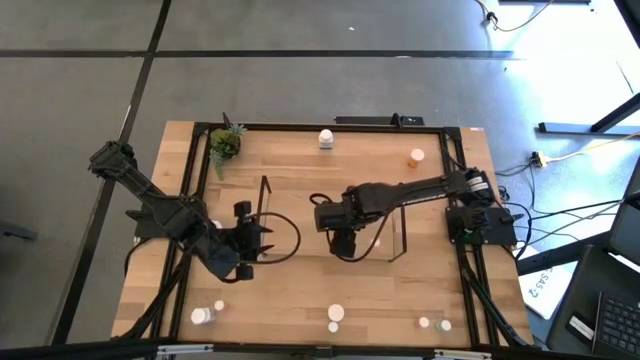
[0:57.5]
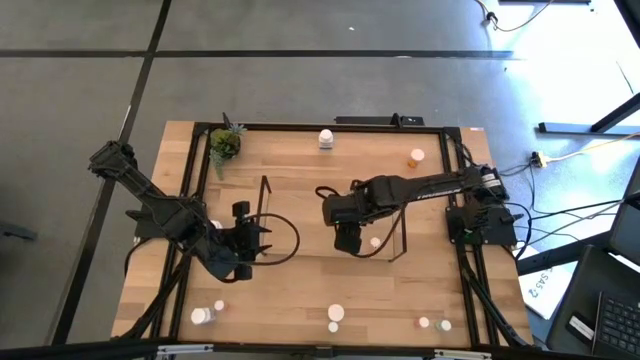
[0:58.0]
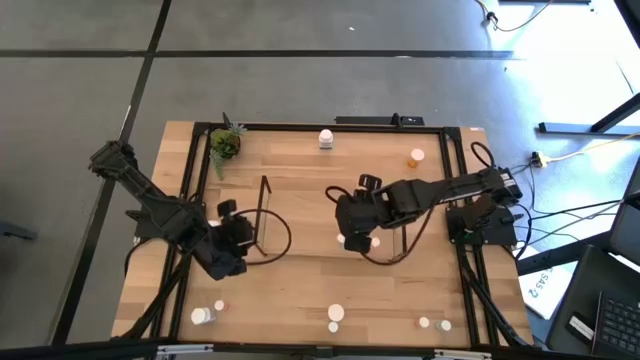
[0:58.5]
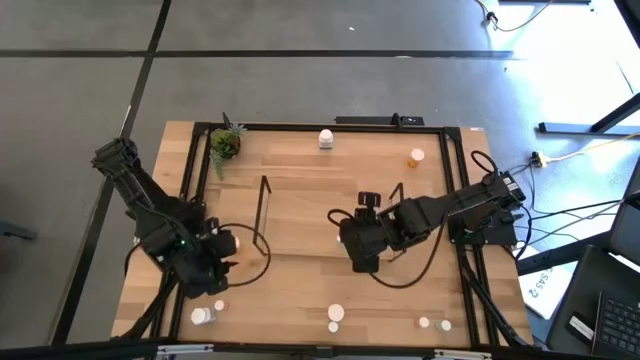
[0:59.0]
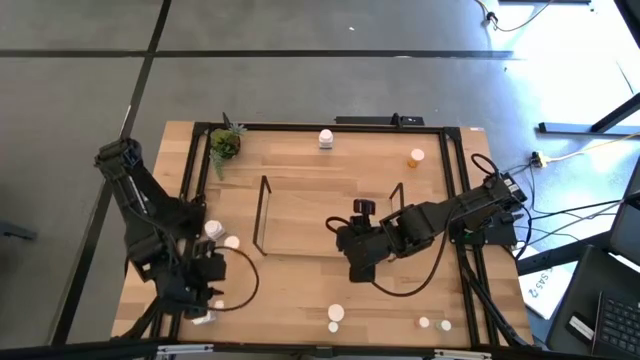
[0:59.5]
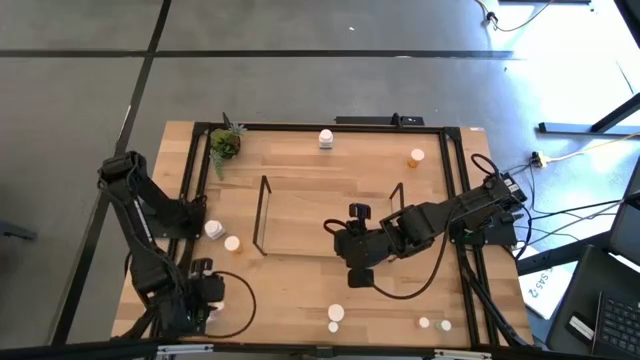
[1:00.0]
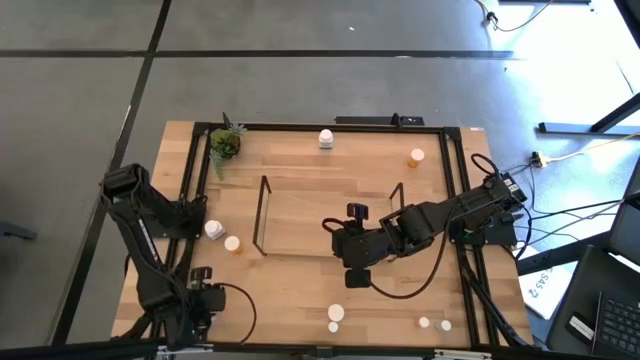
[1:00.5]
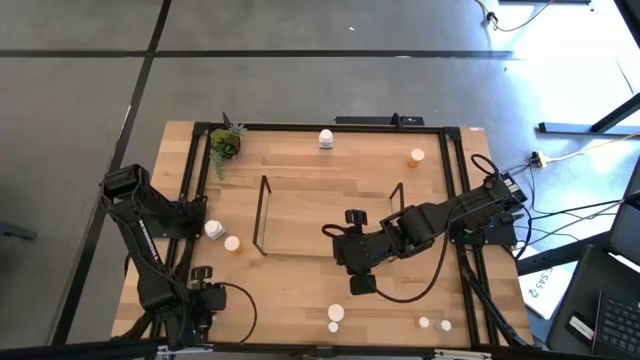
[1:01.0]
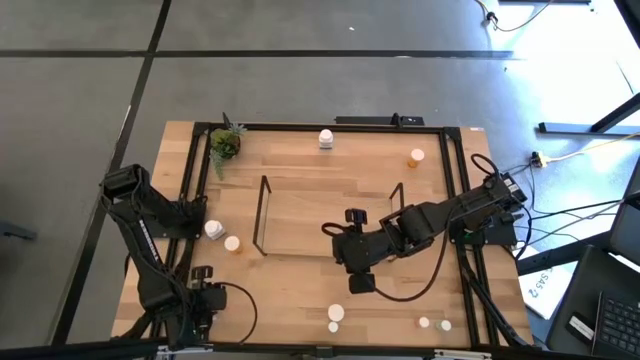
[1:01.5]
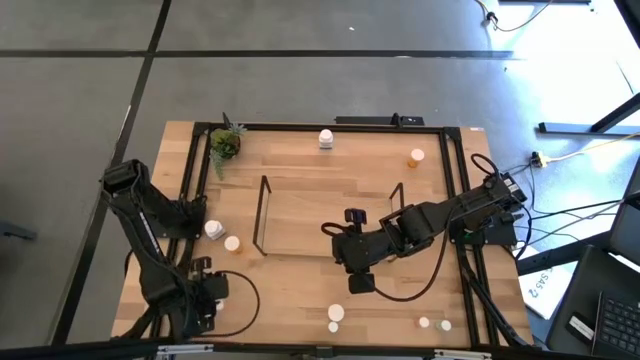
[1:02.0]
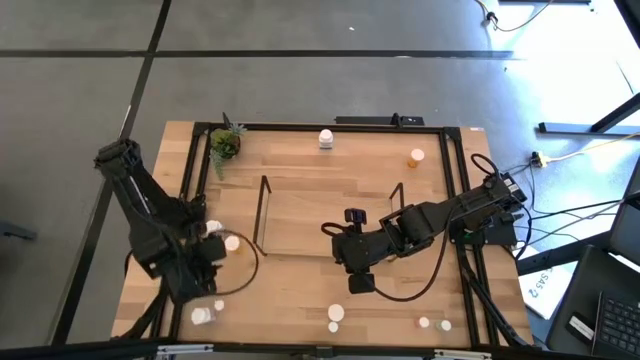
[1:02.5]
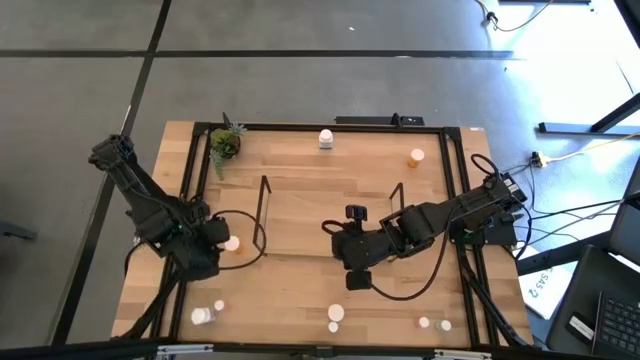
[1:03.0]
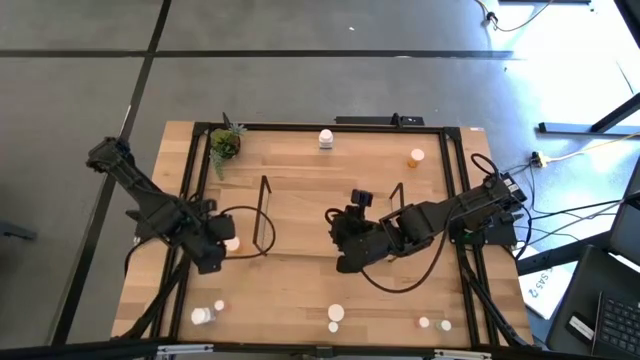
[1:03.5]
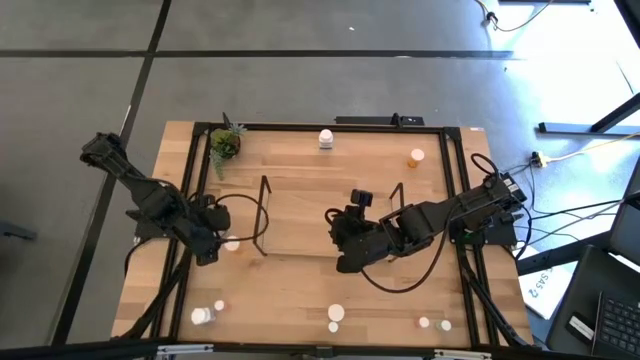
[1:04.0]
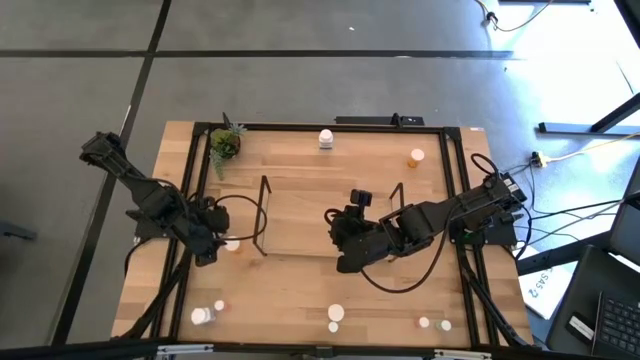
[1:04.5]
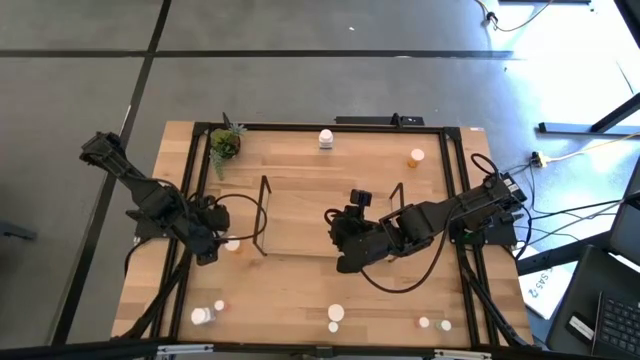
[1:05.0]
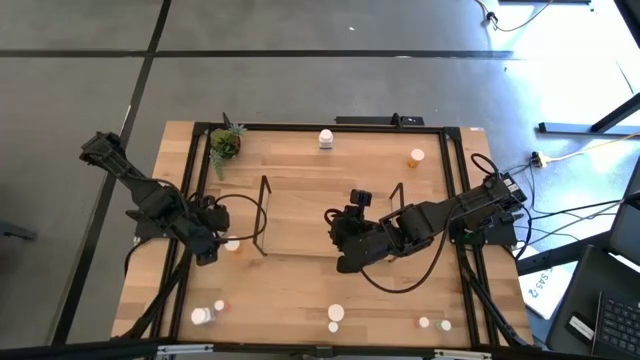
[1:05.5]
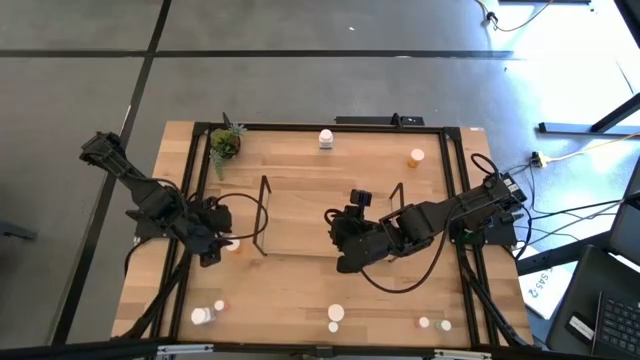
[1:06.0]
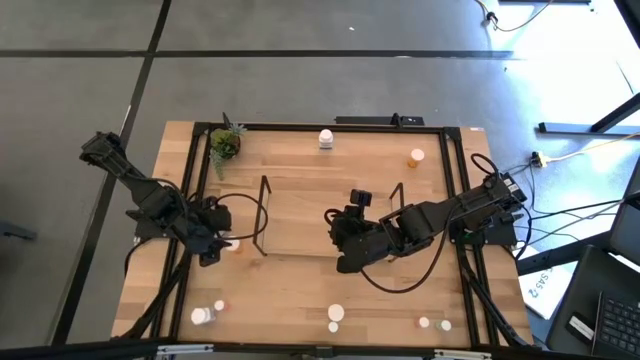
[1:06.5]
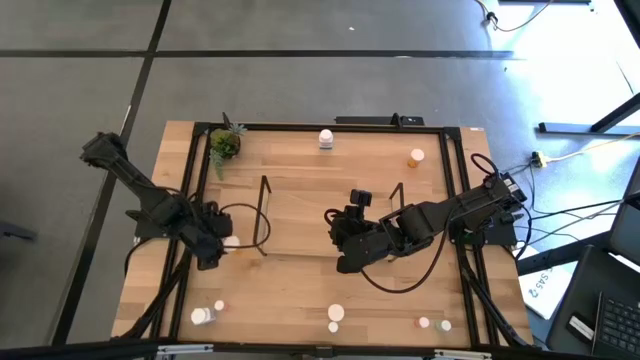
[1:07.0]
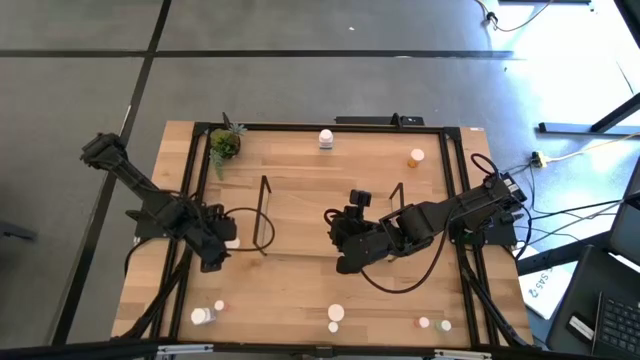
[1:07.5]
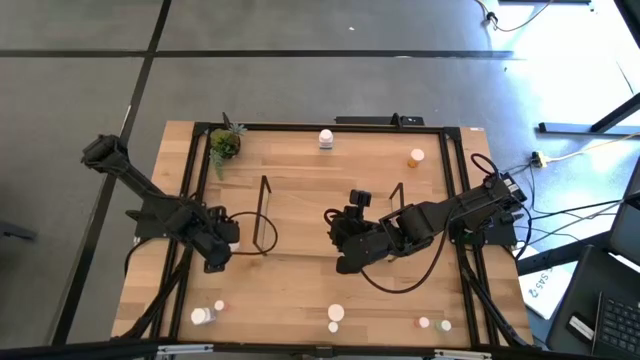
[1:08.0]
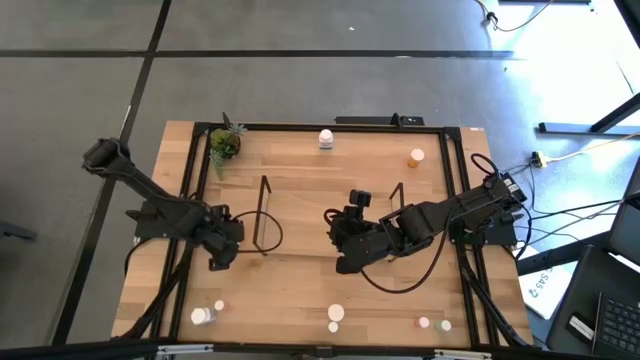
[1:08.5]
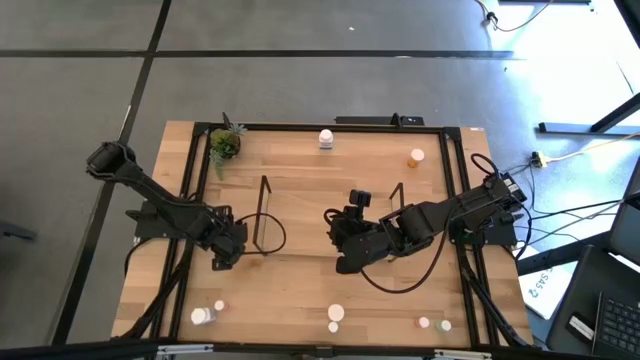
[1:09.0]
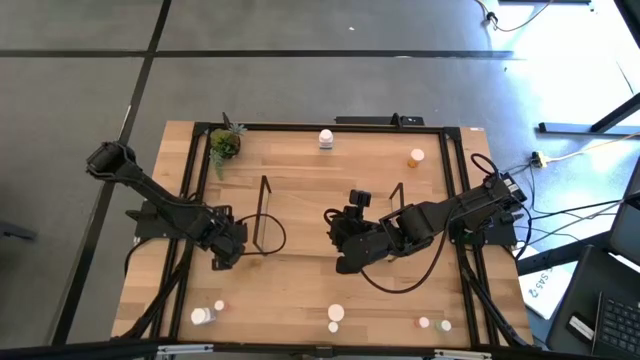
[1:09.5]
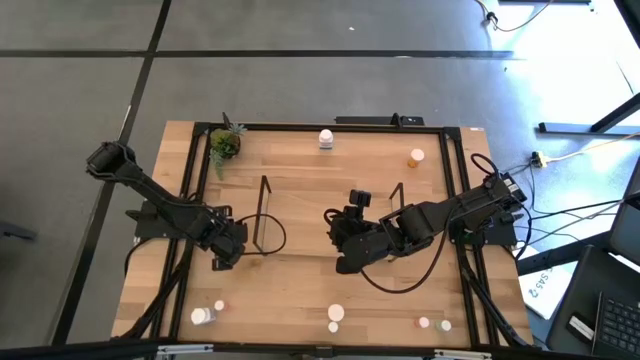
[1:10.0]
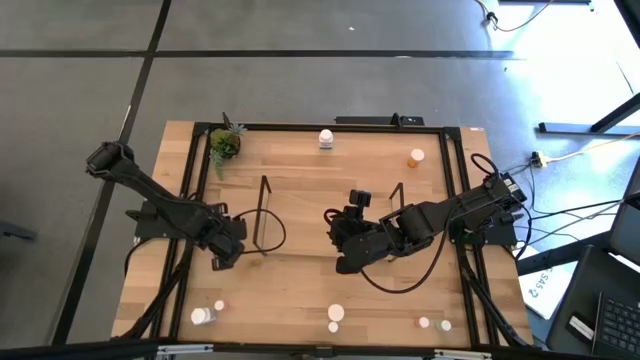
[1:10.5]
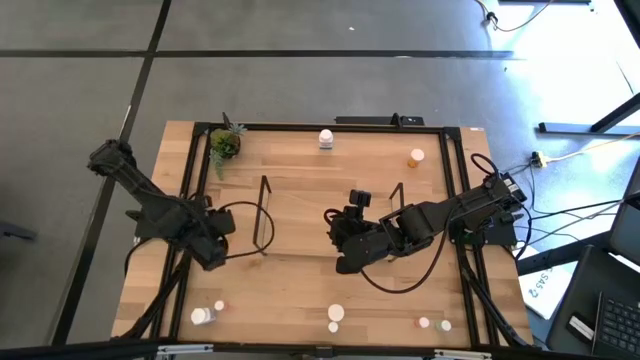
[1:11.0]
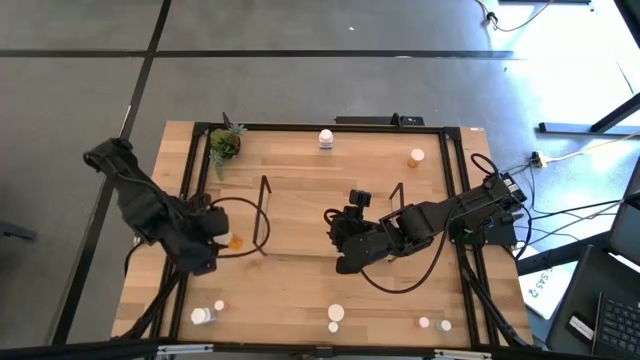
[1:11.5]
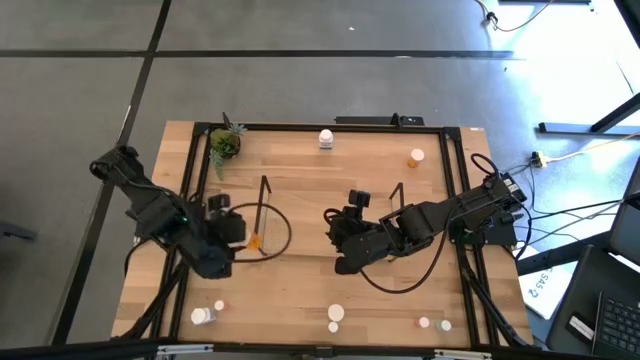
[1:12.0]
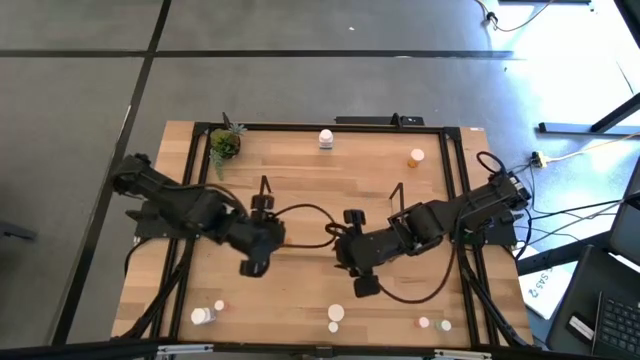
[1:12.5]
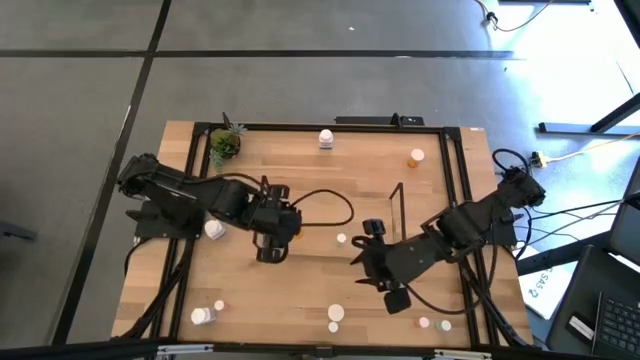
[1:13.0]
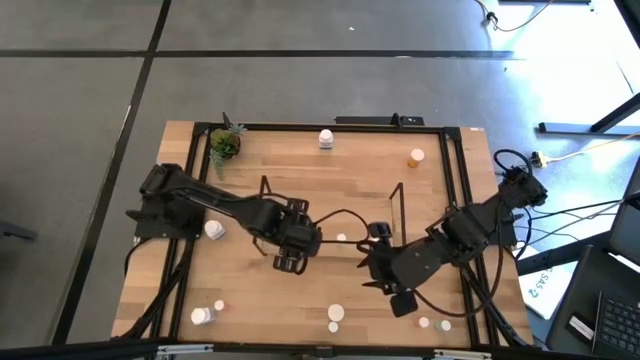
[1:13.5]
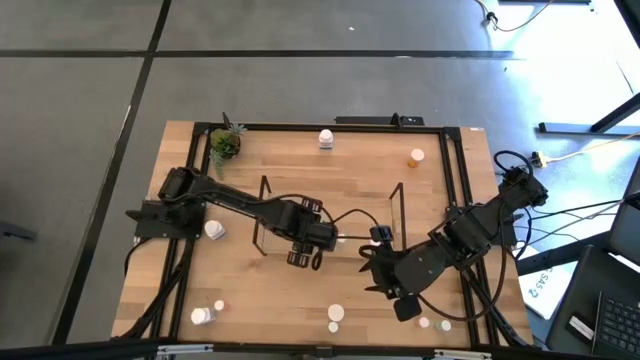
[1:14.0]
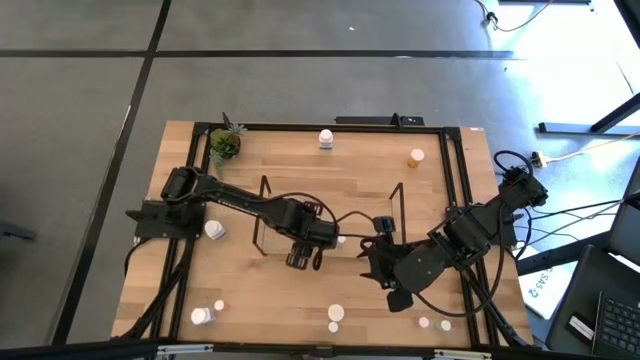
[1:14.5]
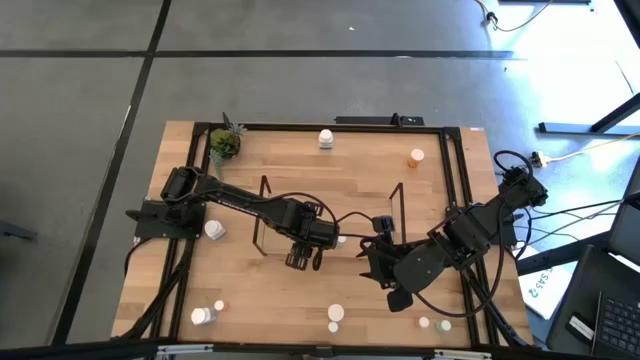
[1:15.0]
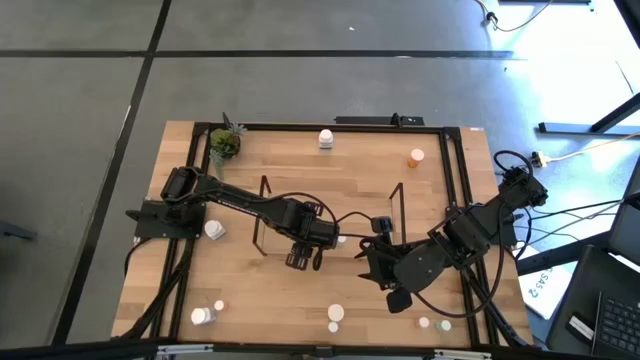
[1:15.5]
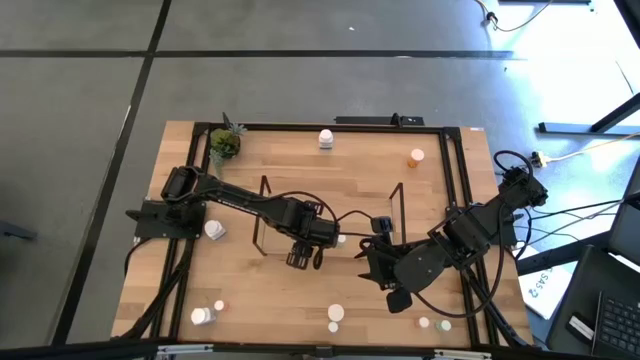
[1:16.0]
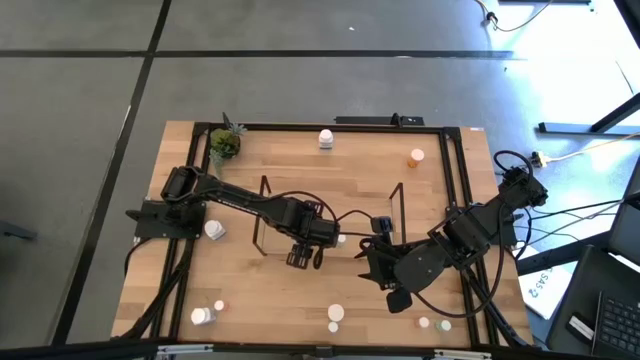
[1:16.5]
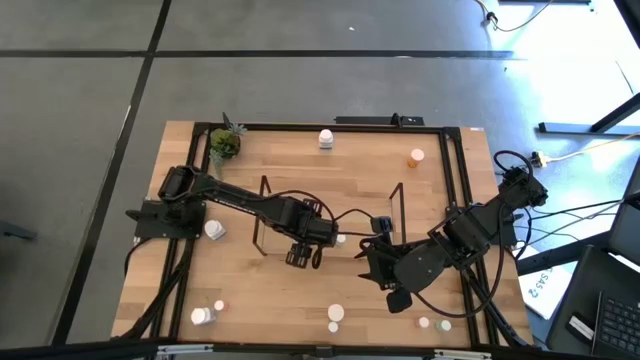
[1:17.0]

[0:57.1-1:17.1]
Task: Pick and place medicine bottles onto shelf by color
Put the middle orange pill bottle on the shelf

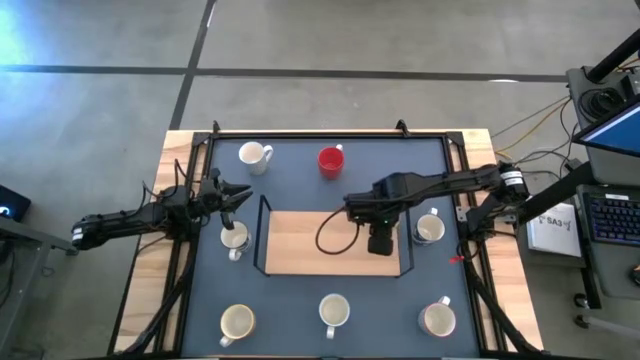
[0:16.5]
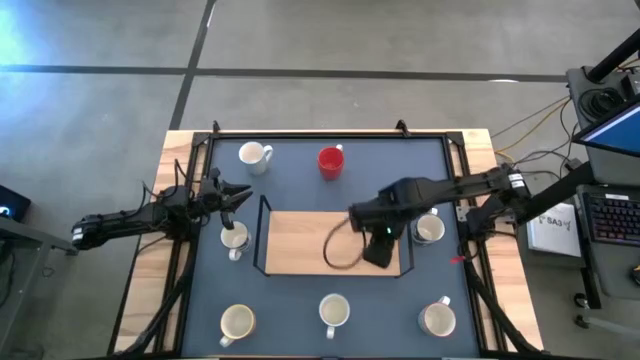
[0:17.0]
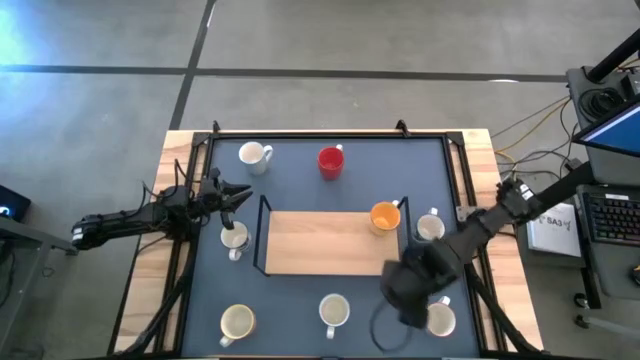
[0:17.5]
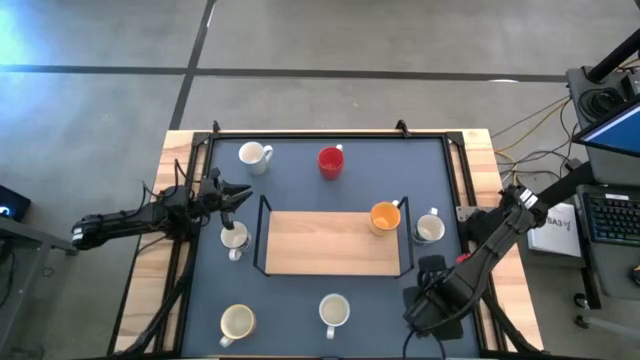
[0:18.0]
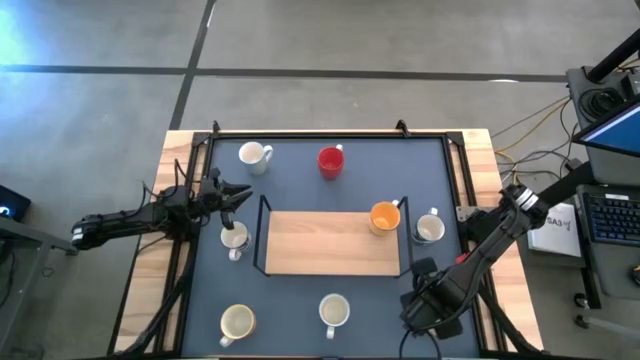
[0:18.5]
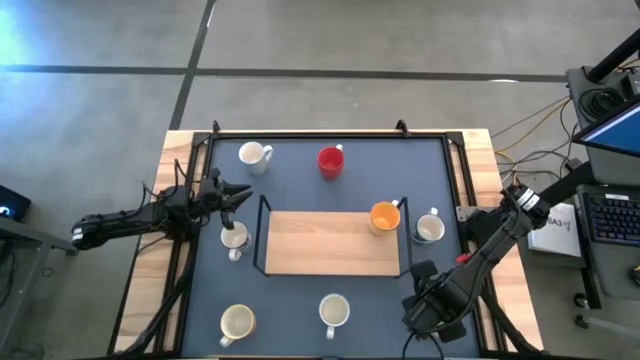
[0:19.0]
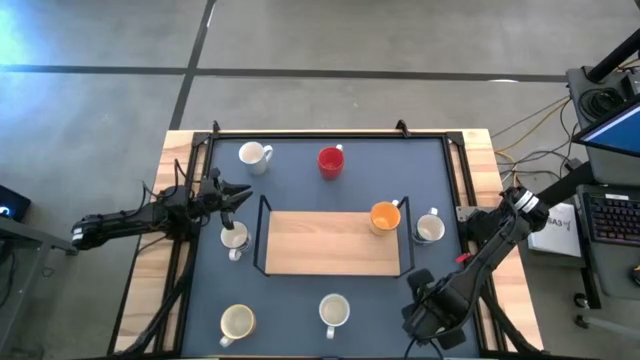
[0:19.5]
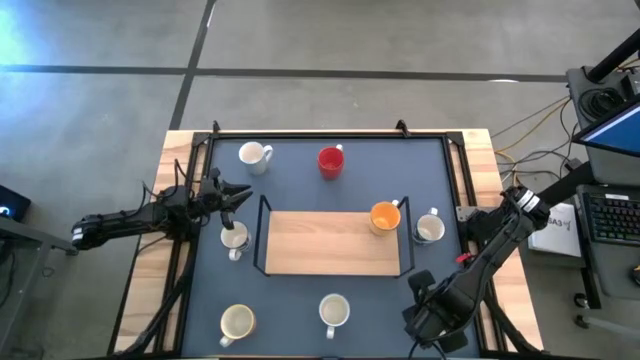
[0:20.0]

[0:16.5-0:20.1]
Task: Place coffee mugs
Put the gray cup on the shelf aligned with the other yellow cup
